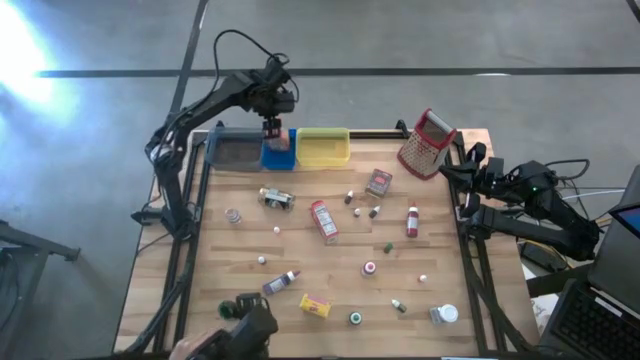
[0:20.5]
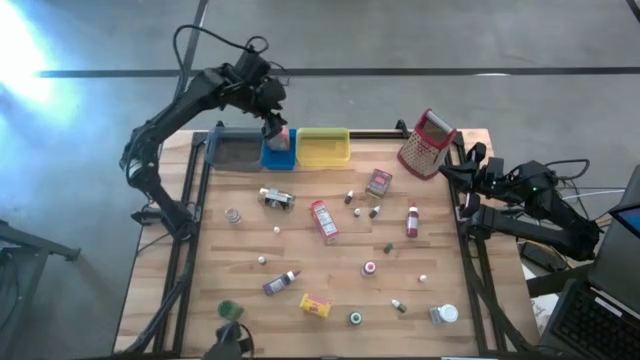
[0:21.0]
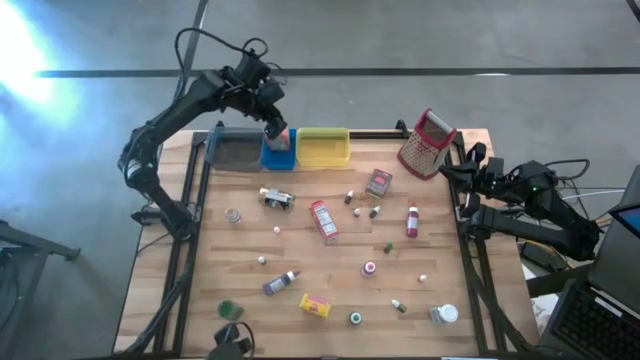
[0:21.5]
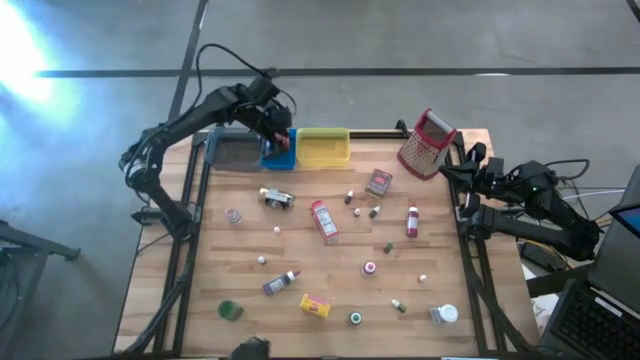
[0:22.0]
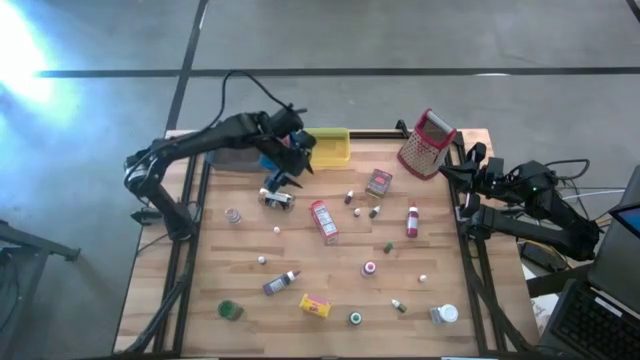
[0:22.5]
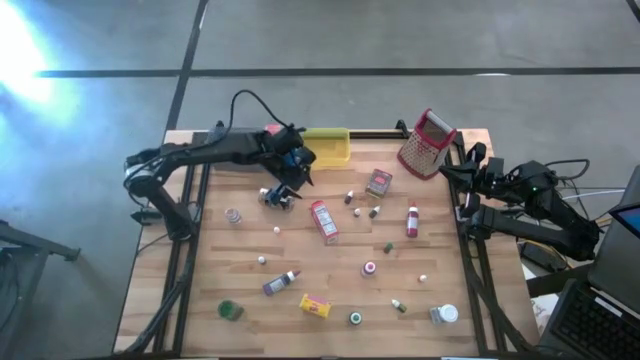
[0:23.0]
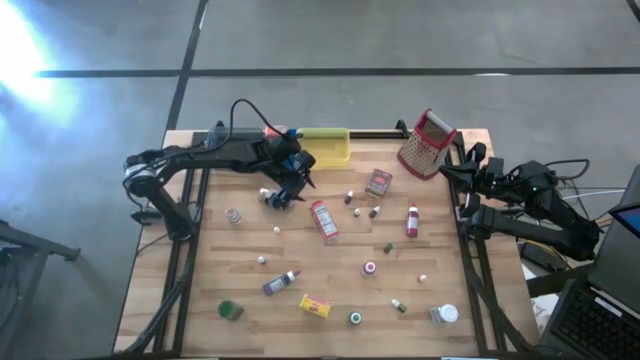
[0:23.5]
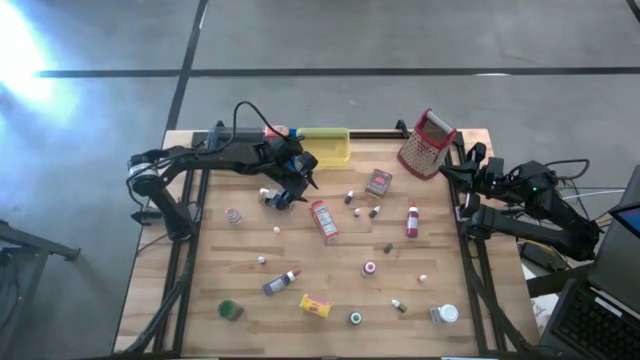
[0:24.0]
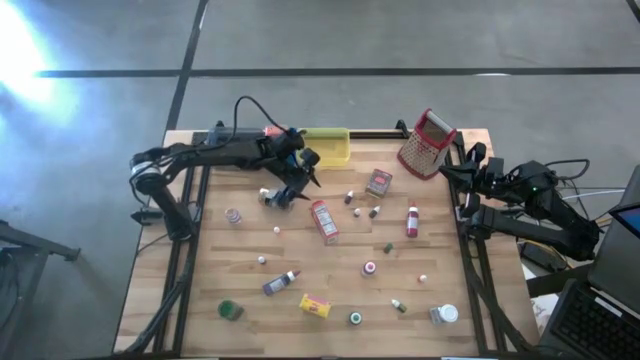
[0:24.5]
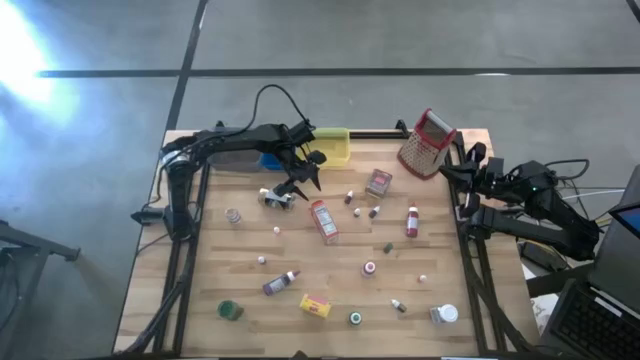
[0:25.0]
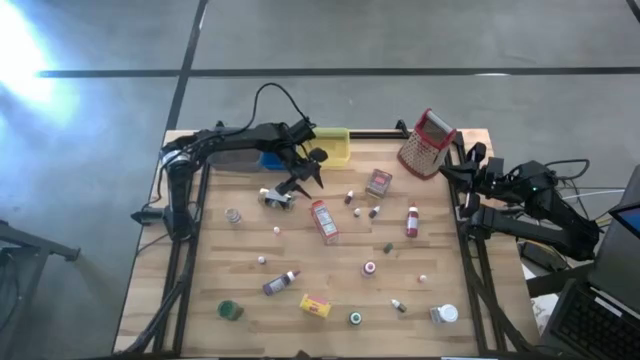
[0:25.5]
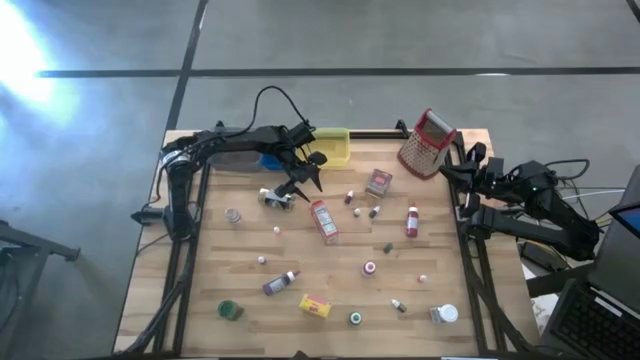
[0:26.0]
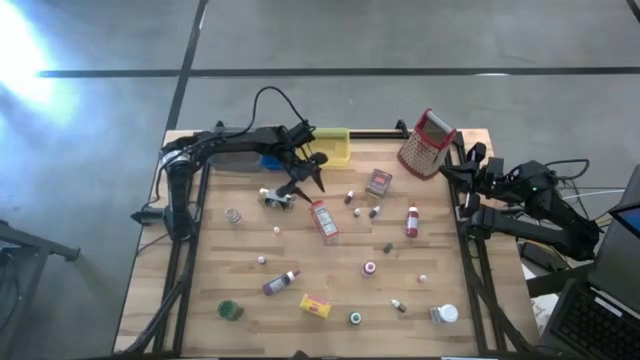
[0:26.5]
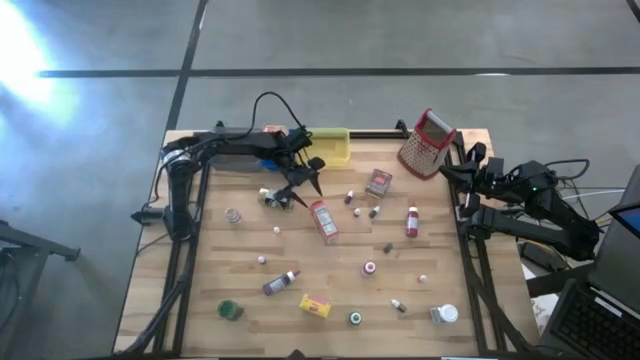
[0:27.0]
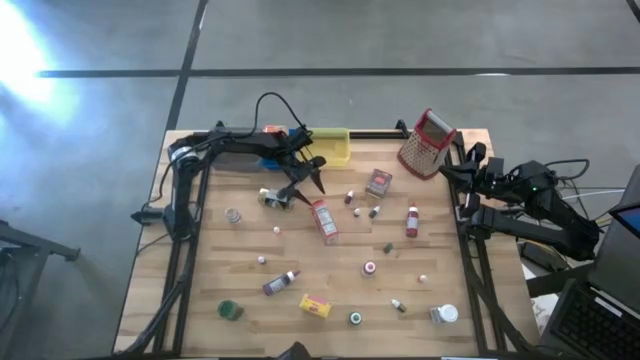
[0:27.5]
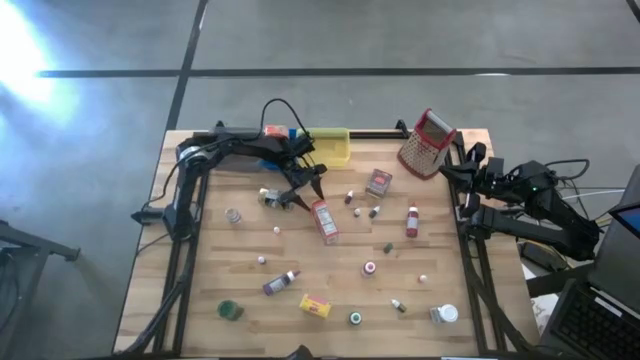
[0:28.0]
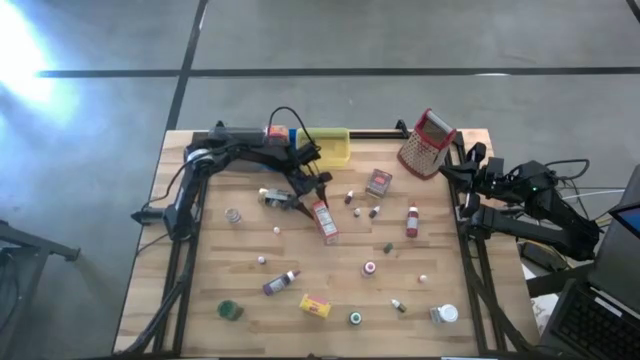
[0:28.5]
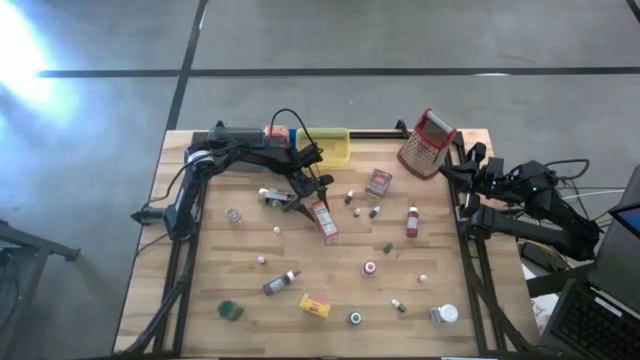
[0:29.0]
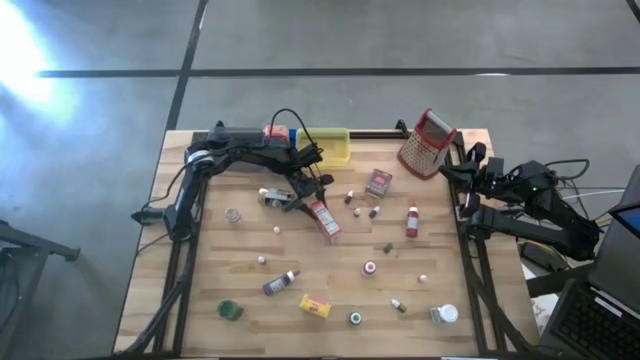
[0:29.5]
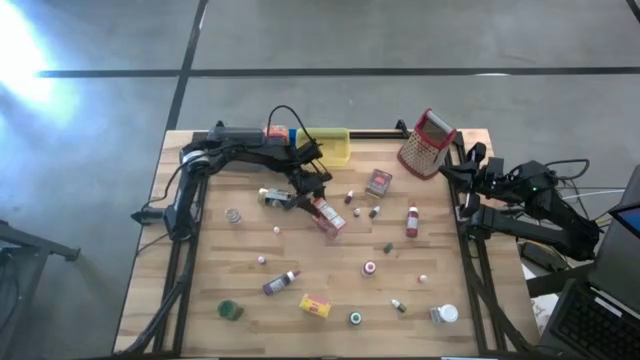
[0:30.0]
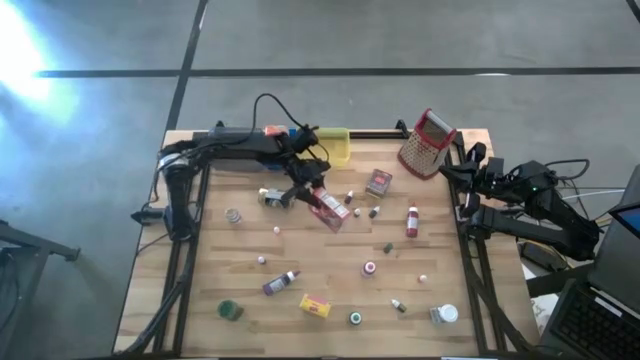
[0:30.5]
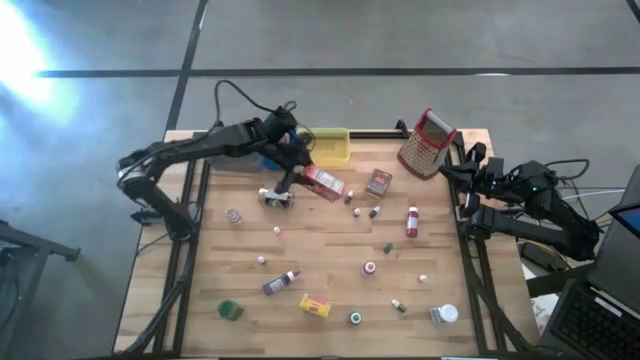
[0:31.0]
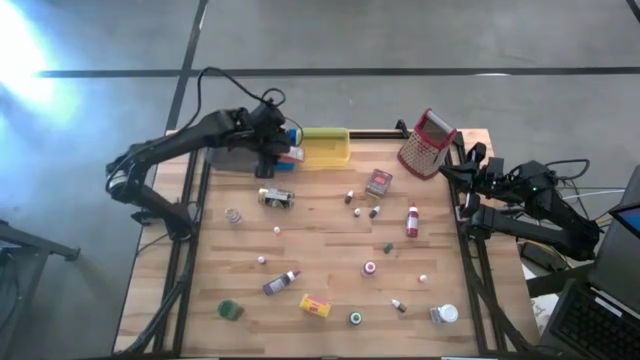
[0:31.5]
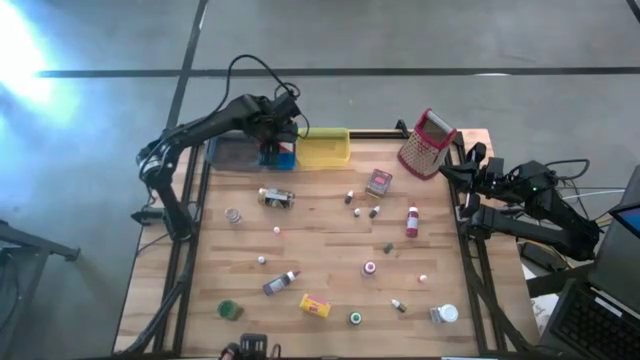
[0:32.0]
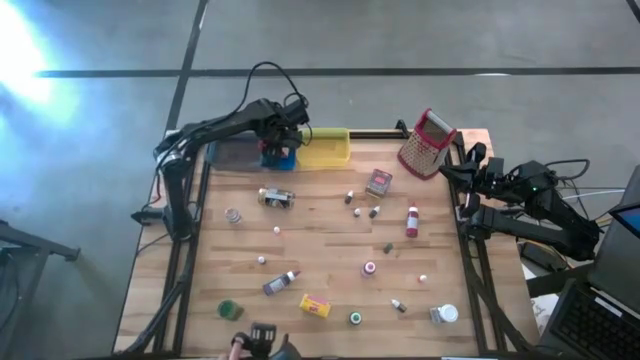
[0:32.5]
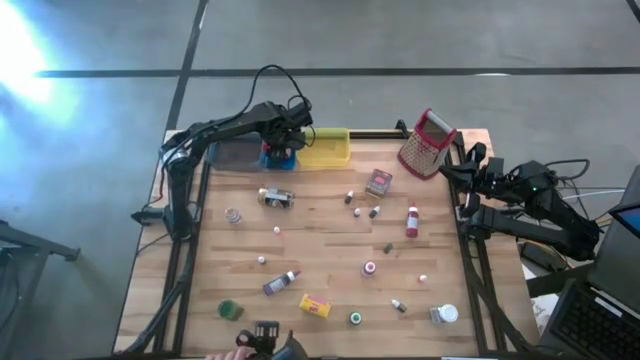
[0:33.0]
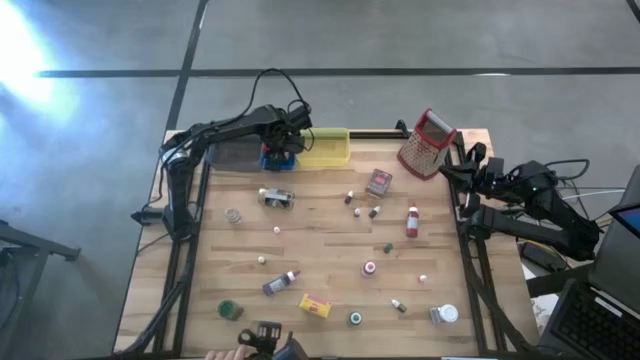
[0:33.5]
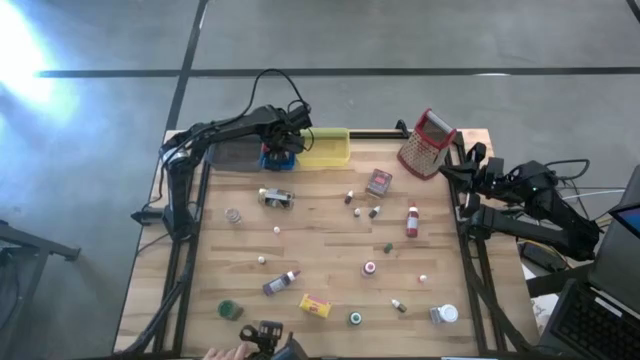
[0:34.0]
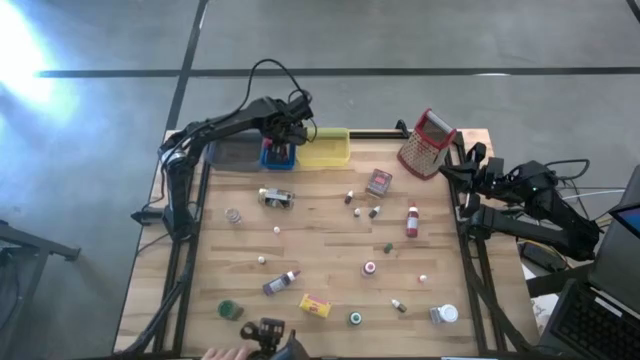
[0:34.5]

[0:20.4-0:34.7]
Task: Pick & Place Kitchen Items
Put the red cereal box into the blue bin

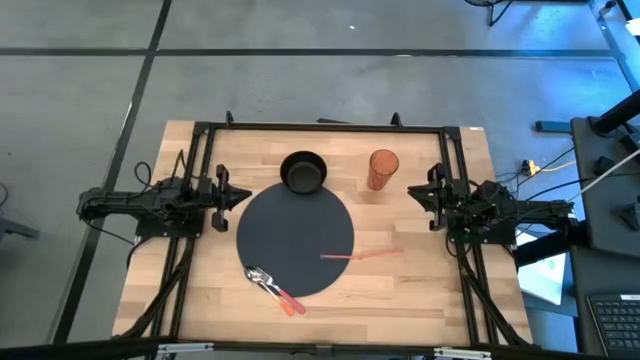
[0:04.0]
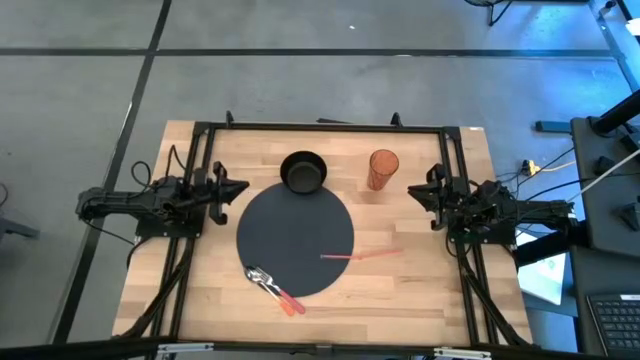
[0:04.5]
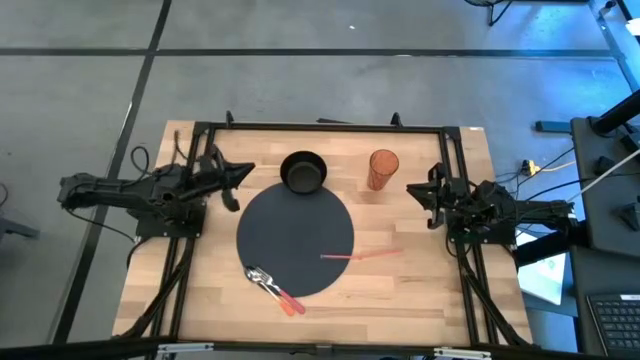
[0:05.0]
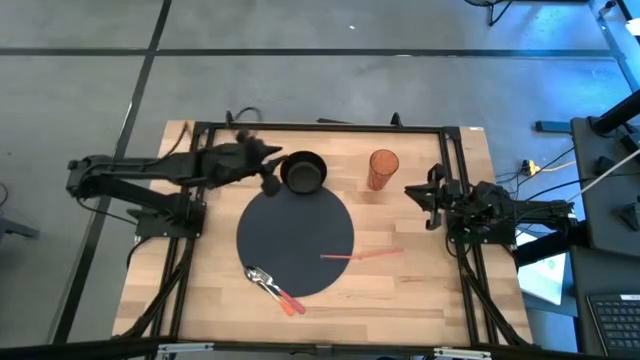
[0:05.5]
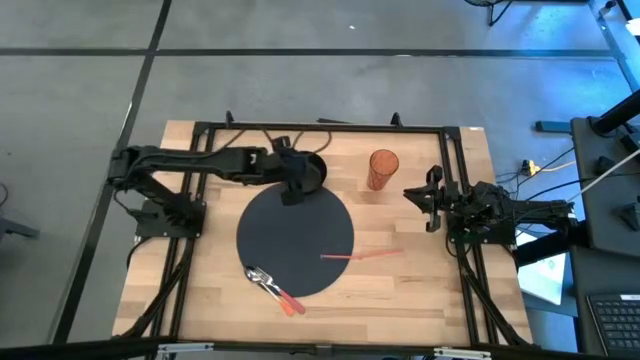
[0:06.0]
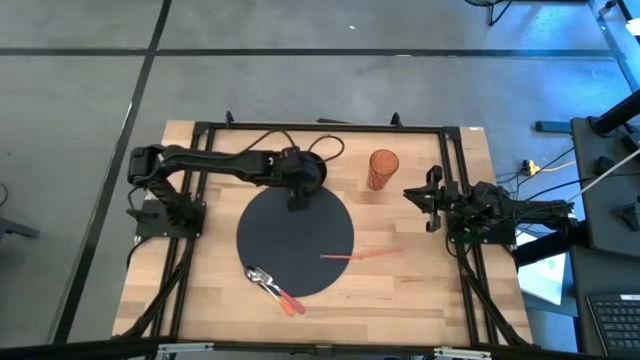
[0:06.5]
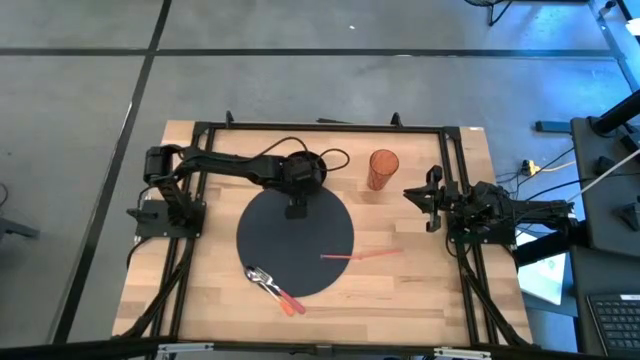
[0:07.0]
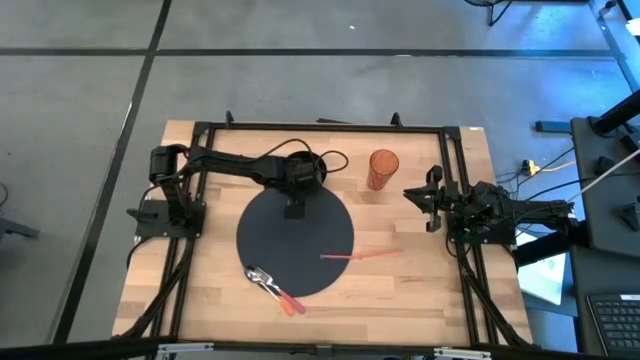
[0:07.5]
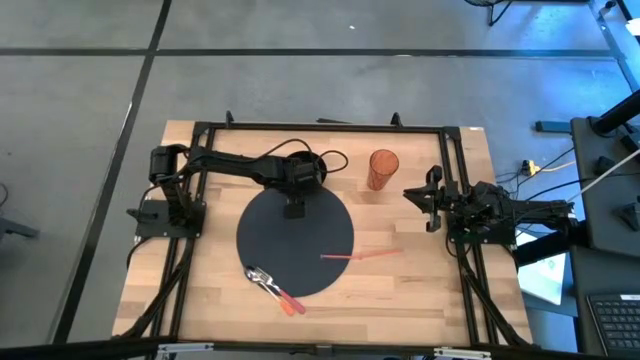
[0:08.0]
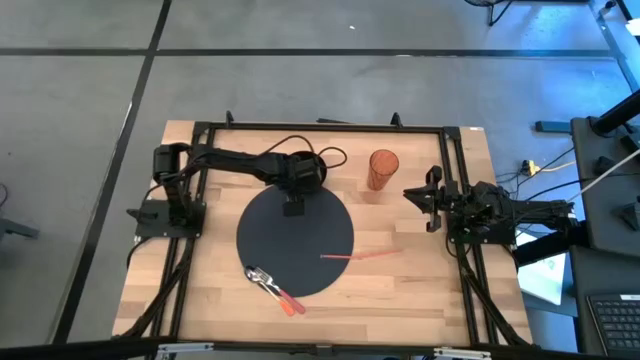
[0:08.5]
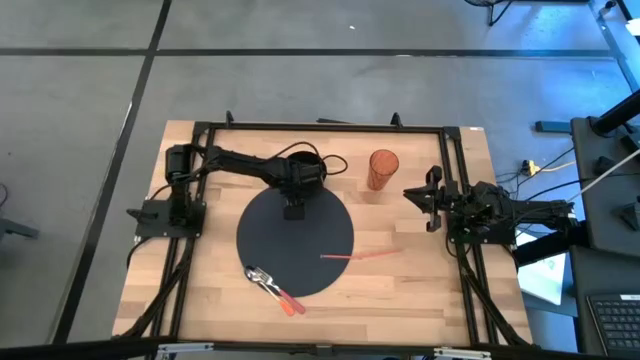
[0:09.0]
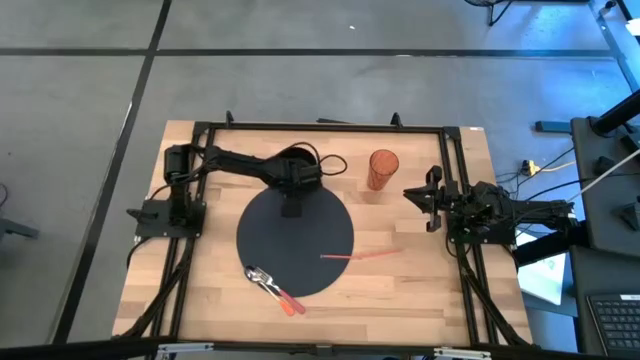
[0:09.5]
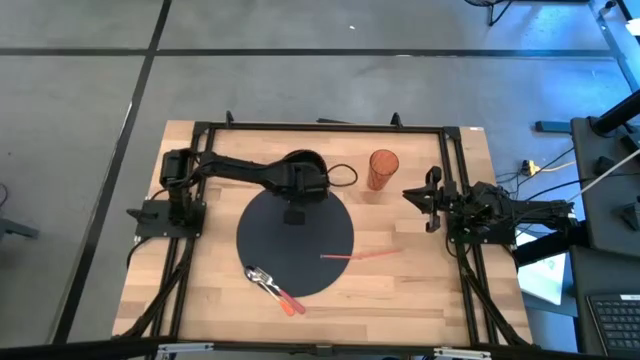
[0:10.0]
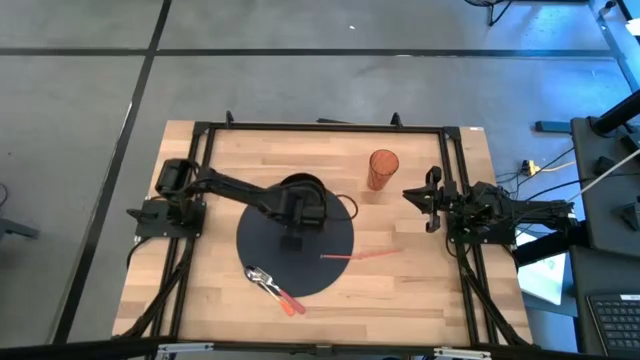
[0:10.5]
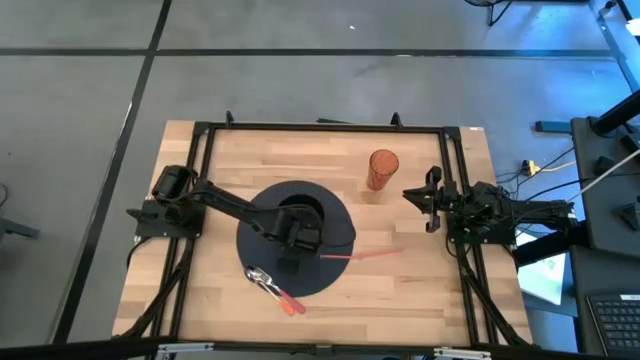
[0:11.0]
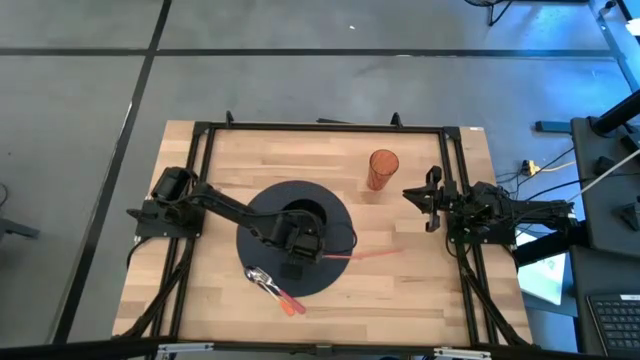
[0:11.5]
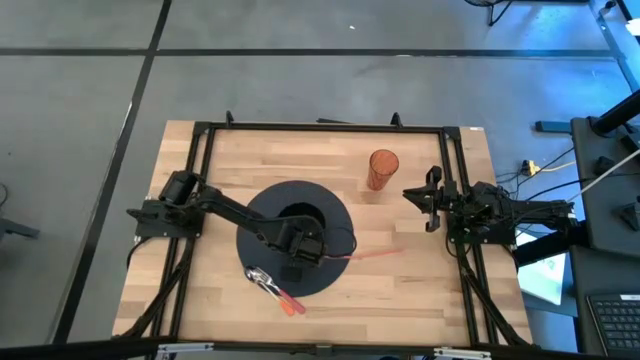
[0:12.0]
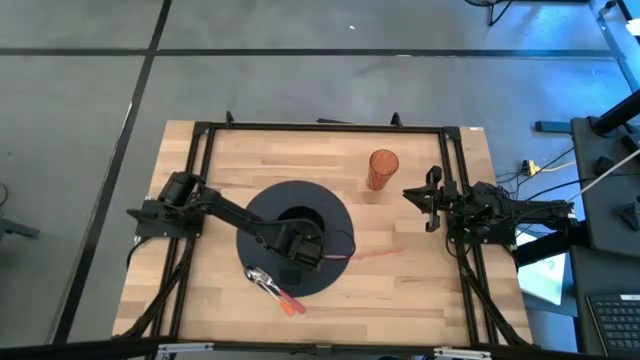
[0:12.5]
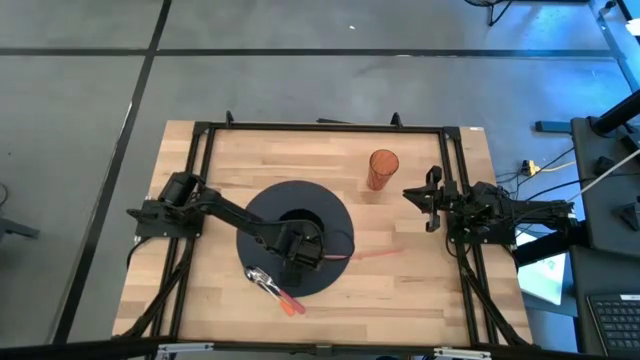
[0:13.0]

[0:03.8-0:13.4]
Task: Pick & Place Utensil
Put the black bowl on the black tablemat
